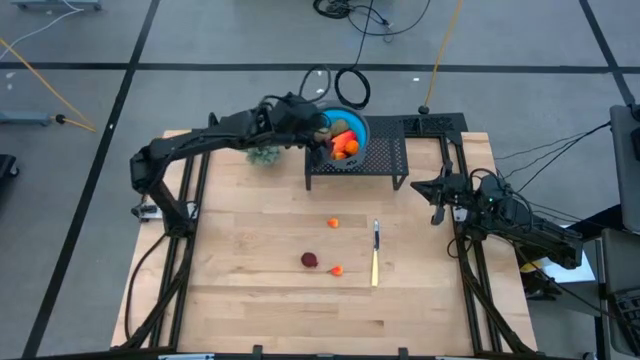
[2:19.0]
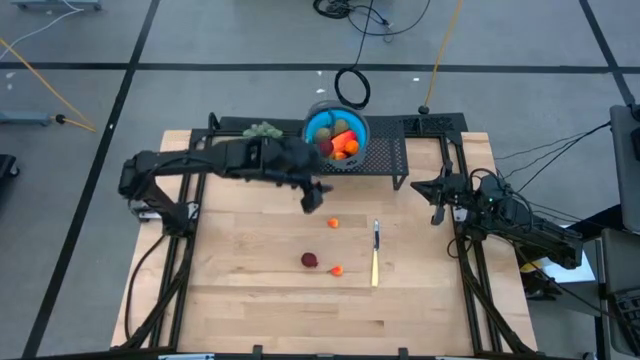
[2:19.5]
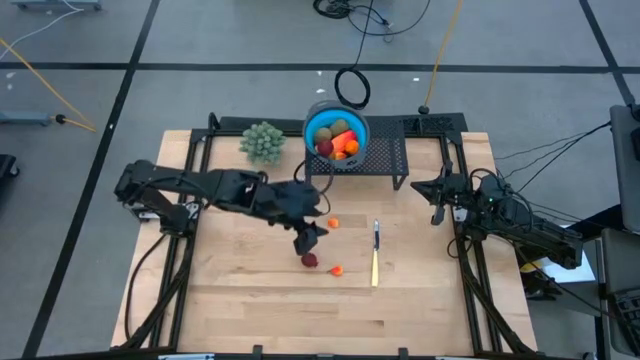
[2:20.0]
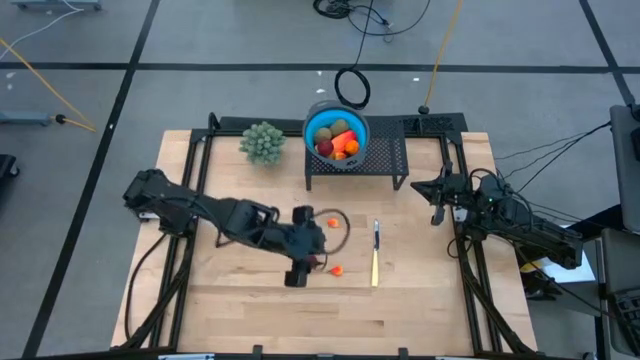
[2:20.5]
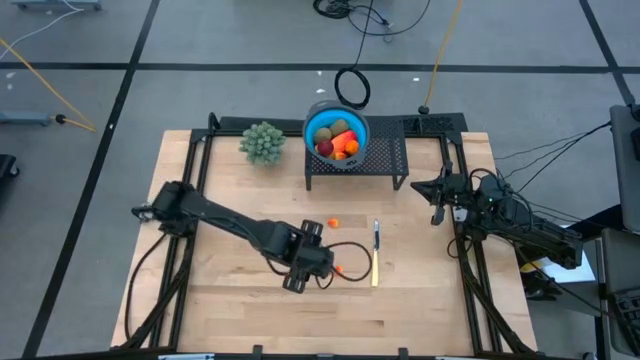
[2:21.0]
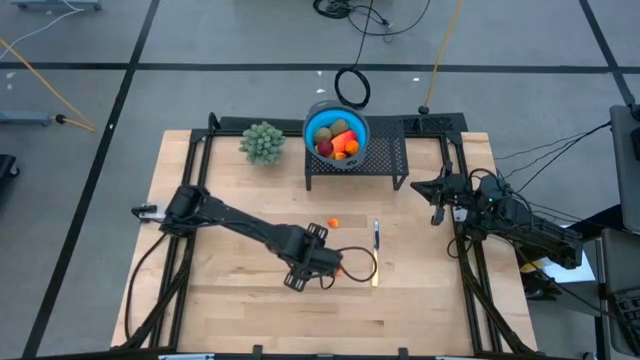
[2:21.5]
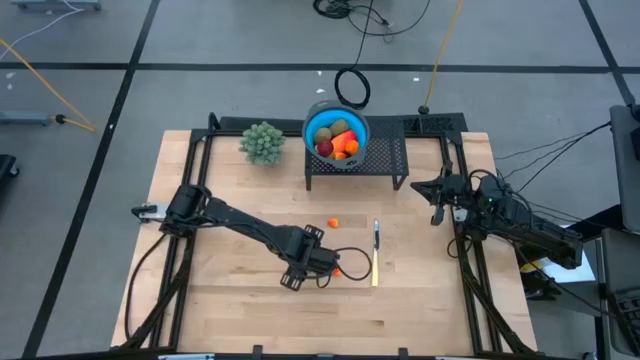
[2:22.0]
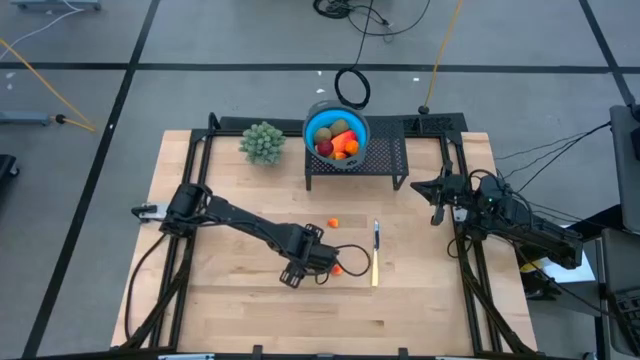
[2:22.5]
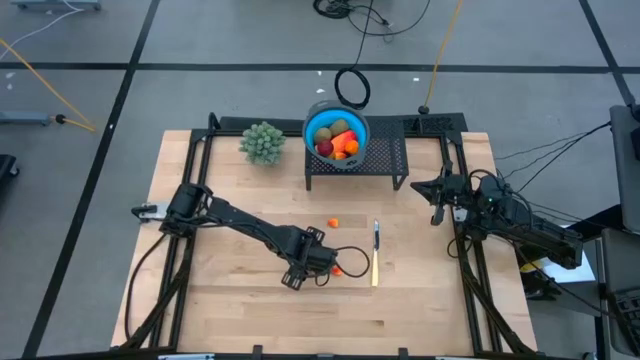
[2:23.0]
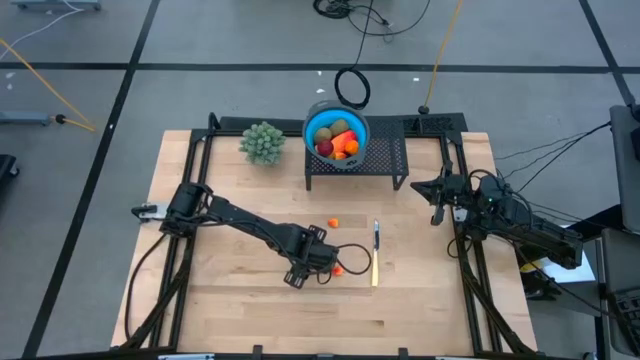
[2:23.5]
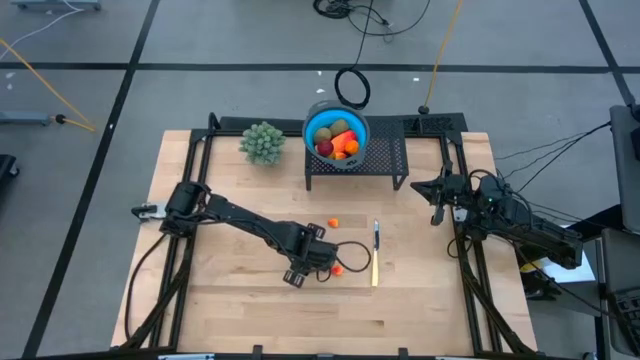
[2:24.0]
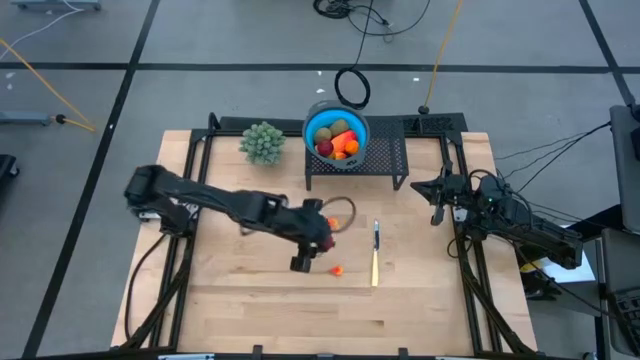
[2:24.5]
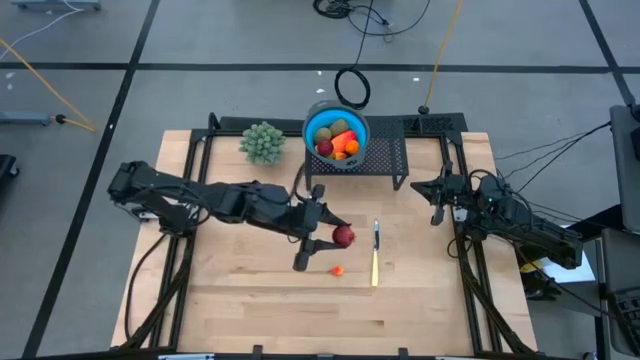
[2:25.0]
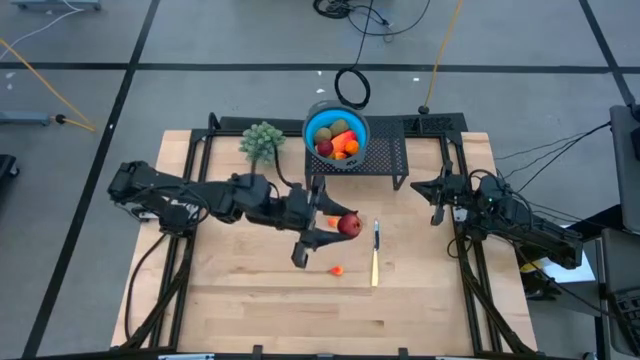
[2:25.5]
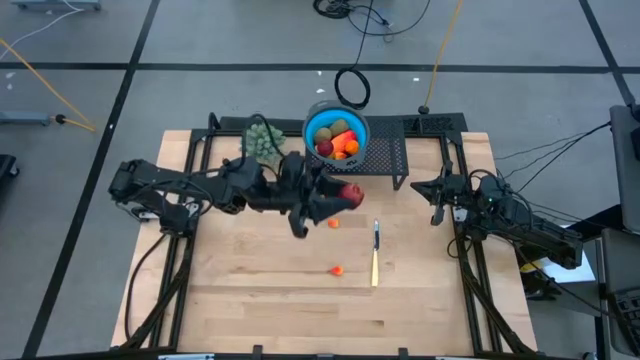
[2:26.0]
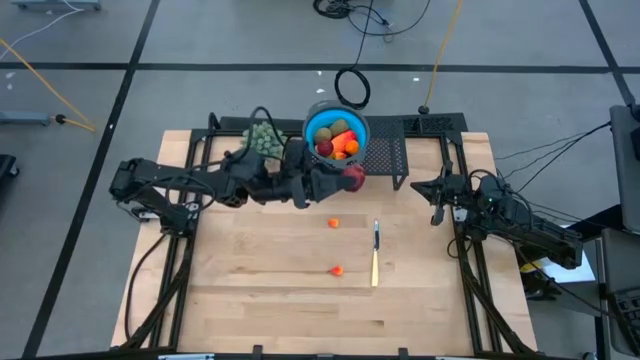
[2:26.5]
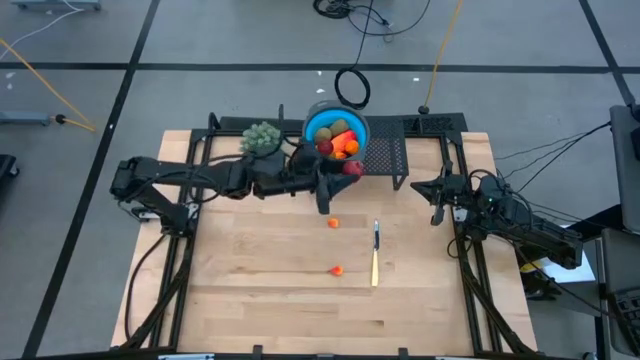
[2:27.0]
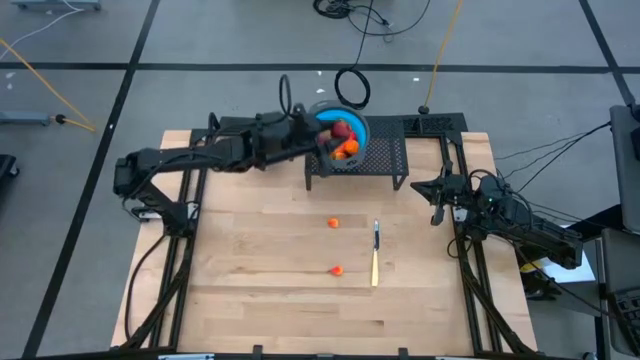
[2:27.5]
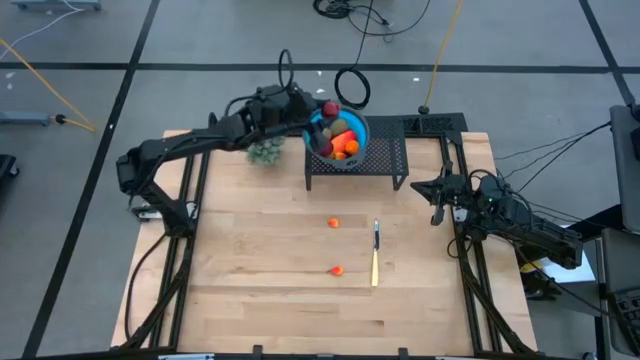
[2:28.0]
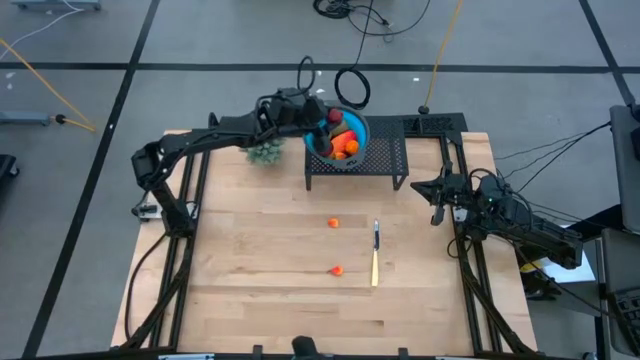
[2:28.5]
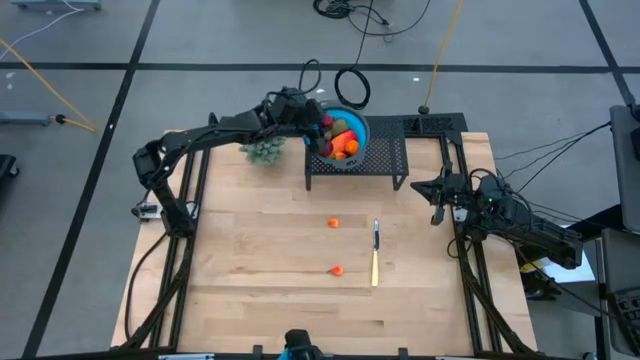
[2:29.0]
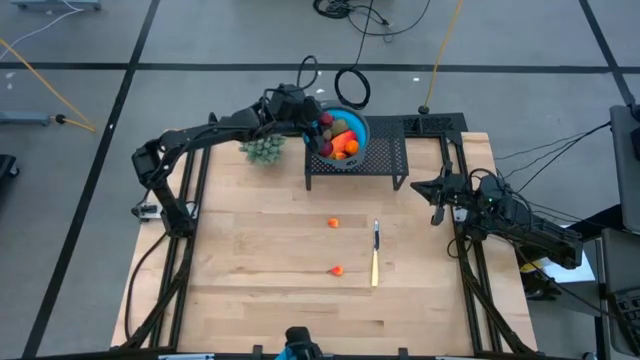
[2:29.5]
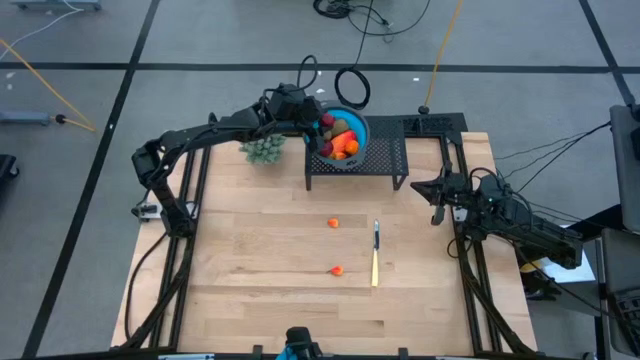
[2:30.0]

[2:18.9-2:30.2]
Task: Pick & Place Fruit
Put the red pomegranate into the blue strainer bowl on the shelf

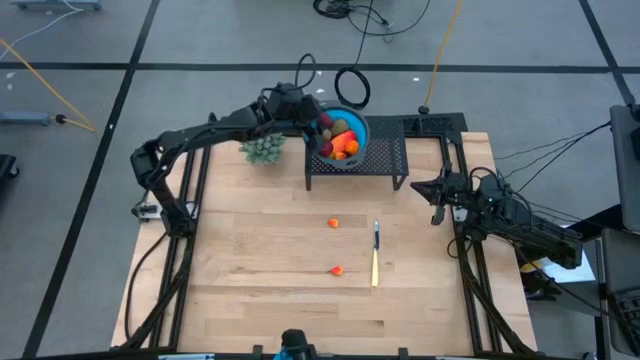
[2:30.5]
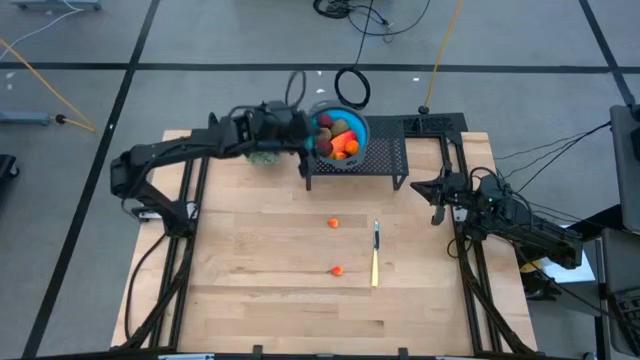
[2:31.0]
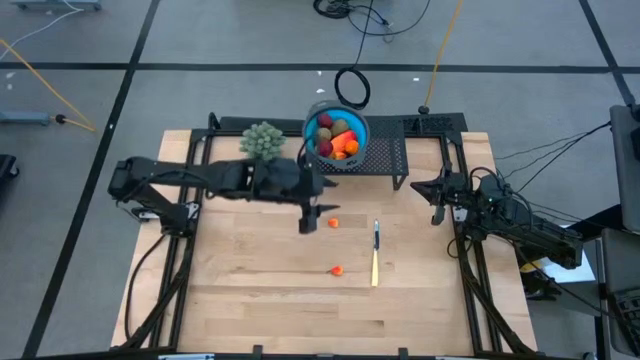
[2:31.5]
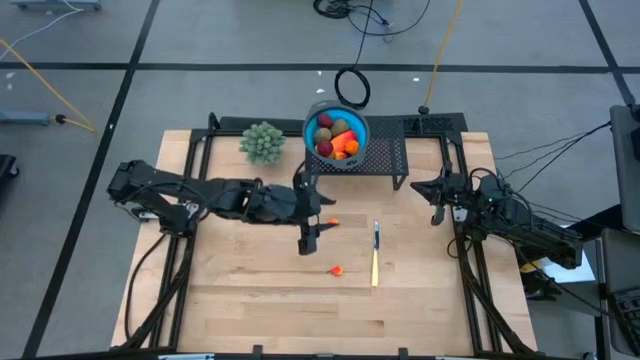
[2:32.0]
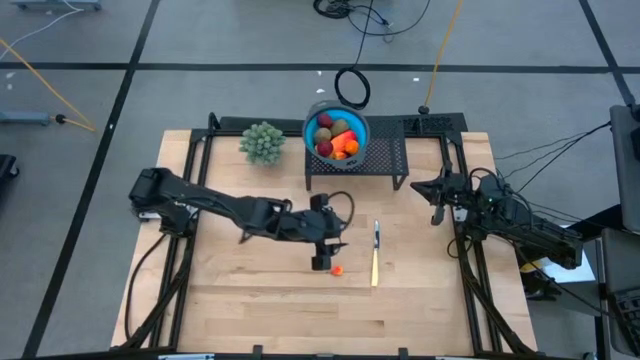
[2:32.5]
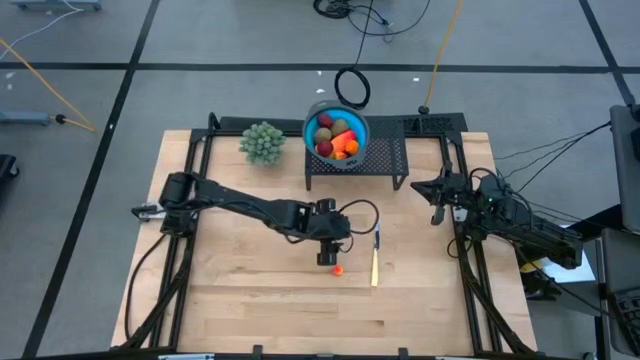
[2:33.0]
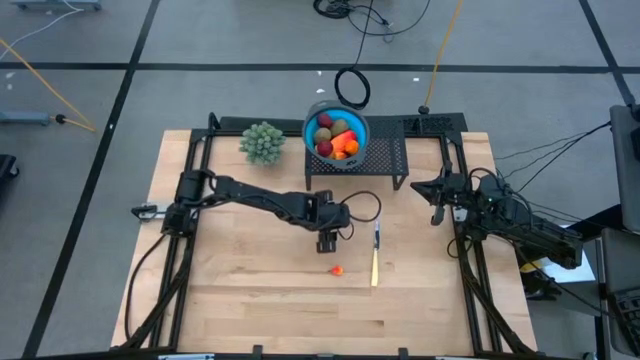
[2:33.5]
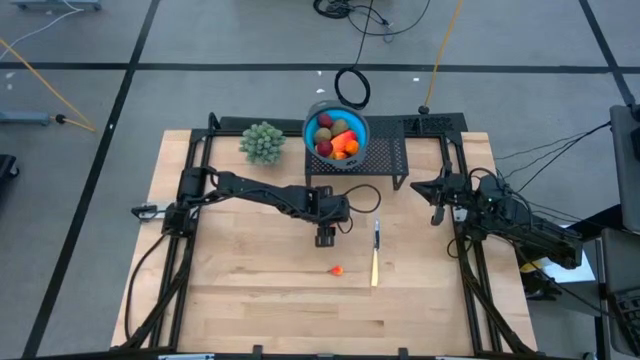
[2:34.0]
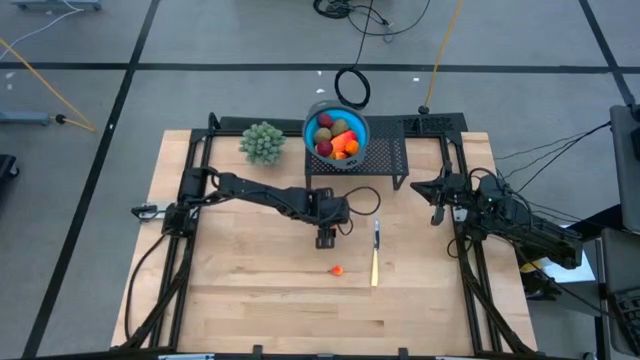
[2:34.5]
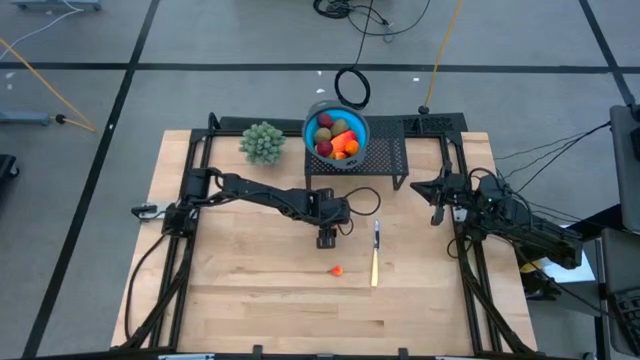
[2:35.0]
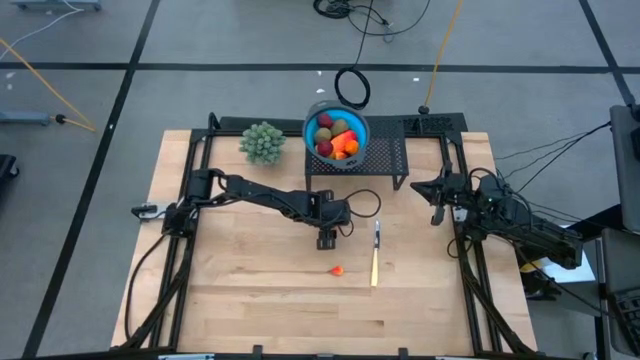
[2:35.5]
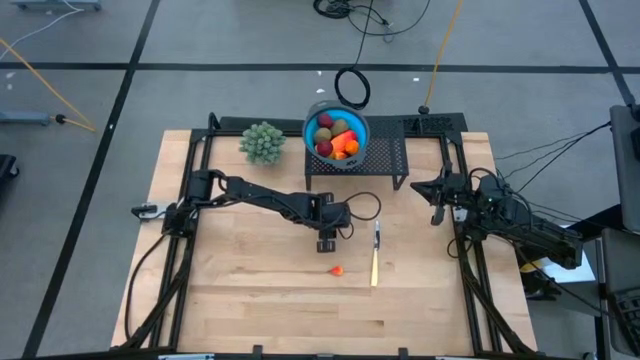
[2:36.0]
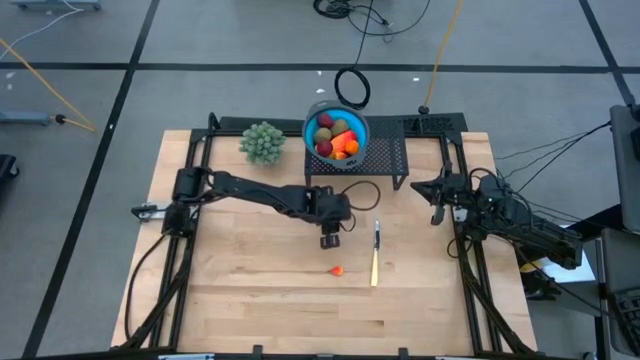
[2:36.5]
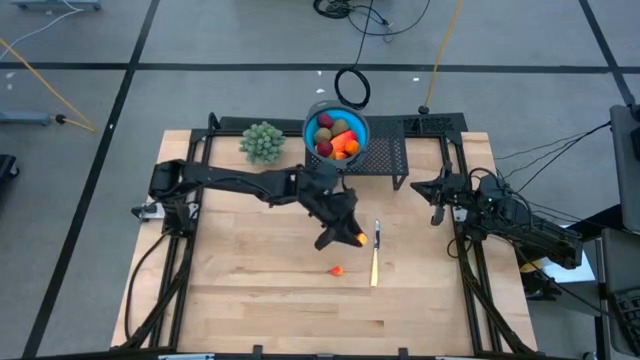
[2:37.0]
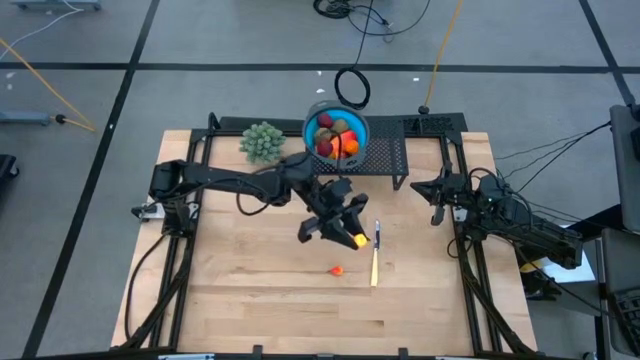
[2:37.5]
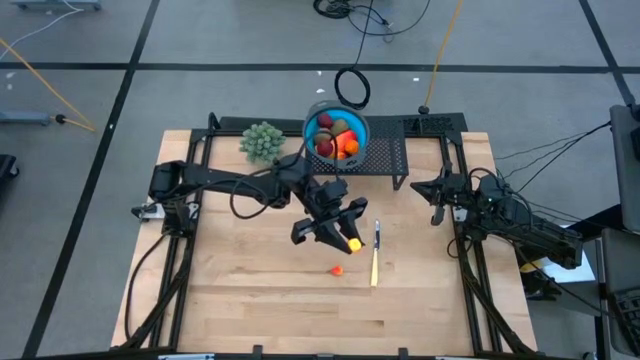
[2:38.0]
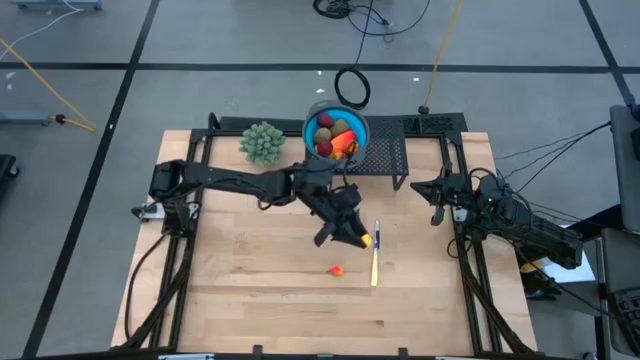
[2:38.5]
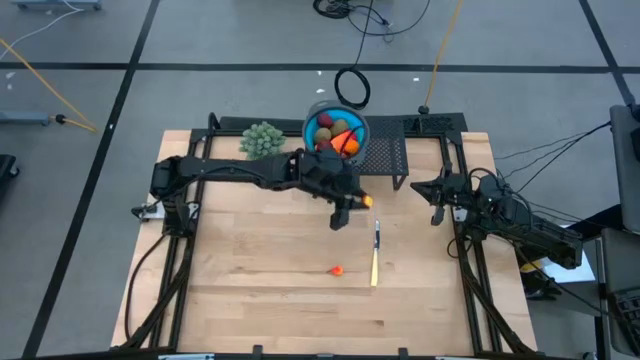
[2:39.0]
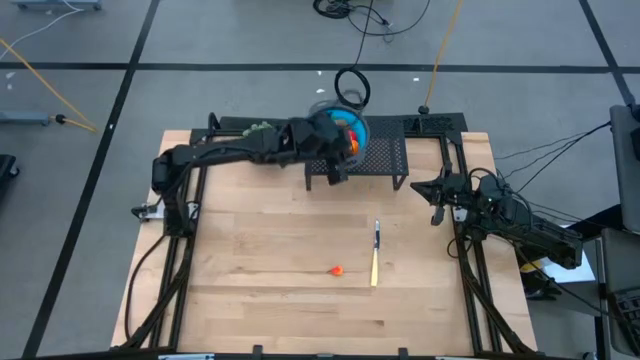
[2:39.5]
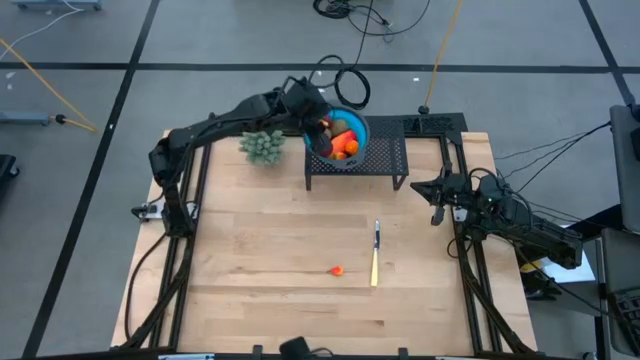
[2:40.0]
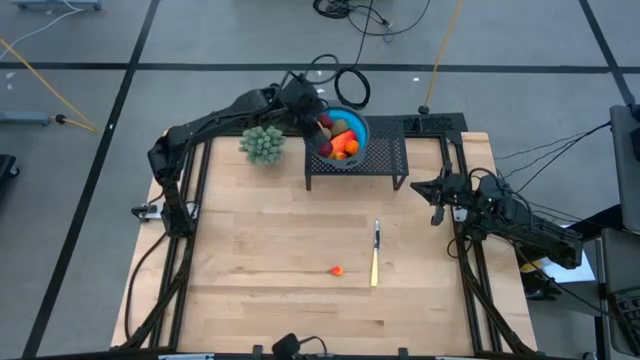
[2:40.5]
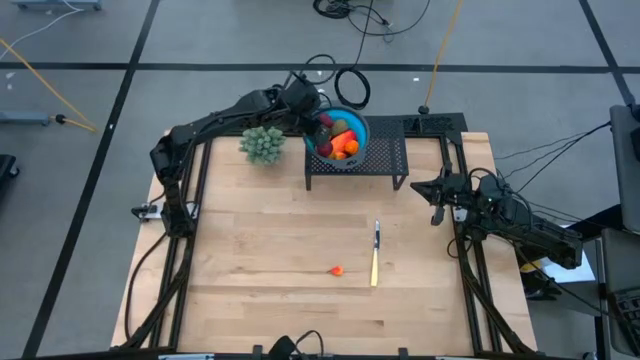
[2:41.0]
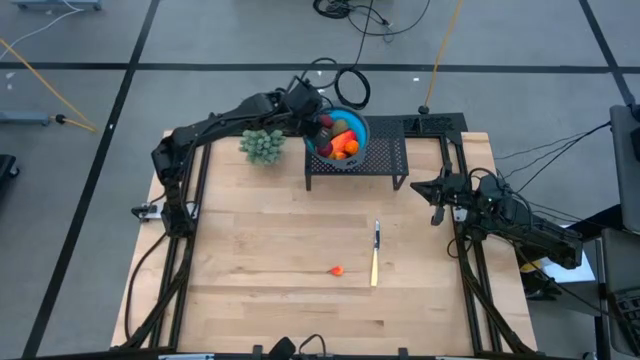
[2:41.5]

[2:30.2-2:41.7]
Put the orange peach into the blue strainer bowl on the shelf
